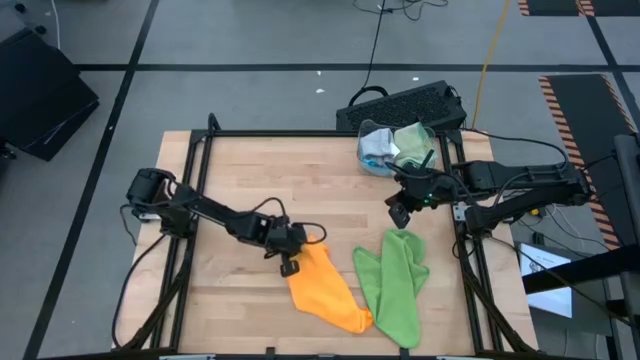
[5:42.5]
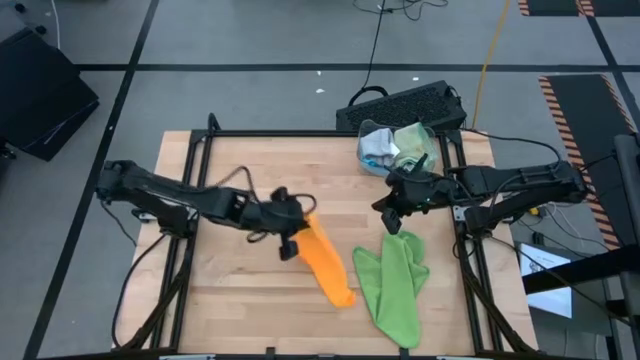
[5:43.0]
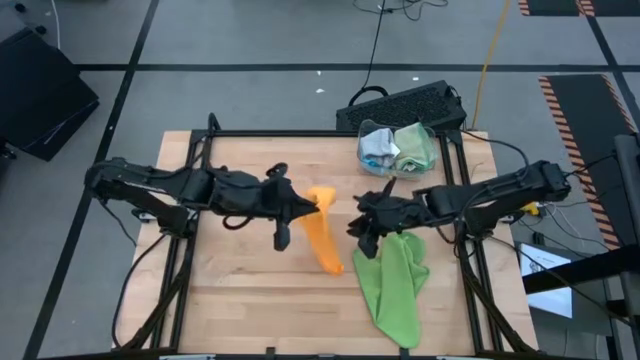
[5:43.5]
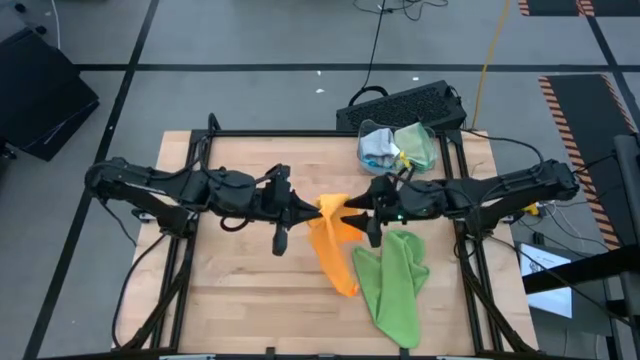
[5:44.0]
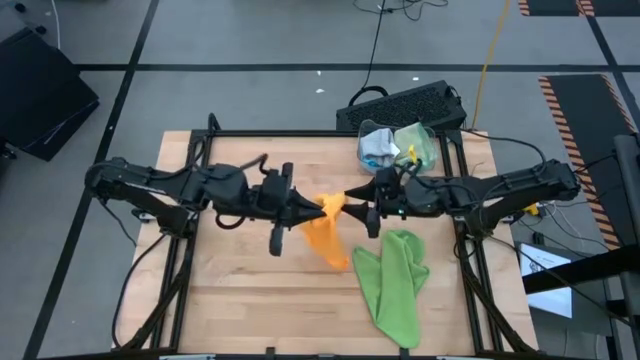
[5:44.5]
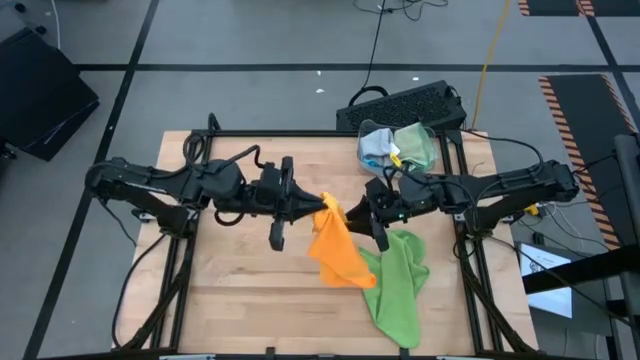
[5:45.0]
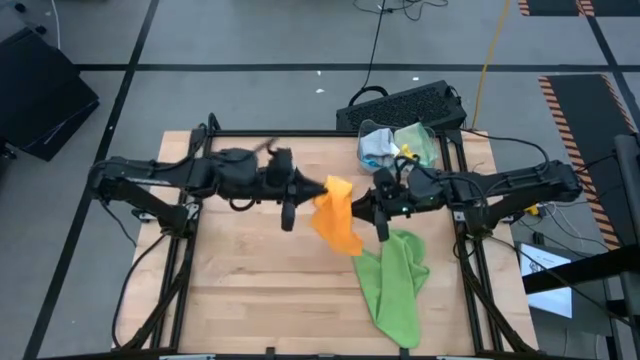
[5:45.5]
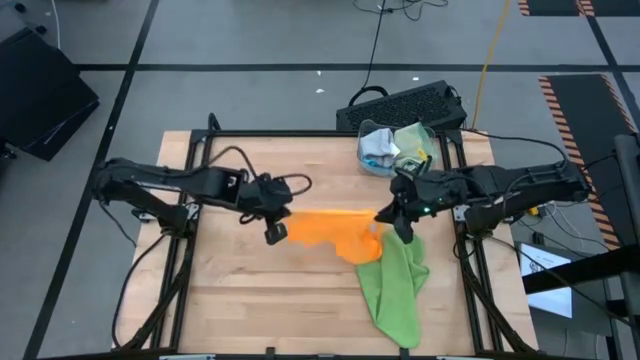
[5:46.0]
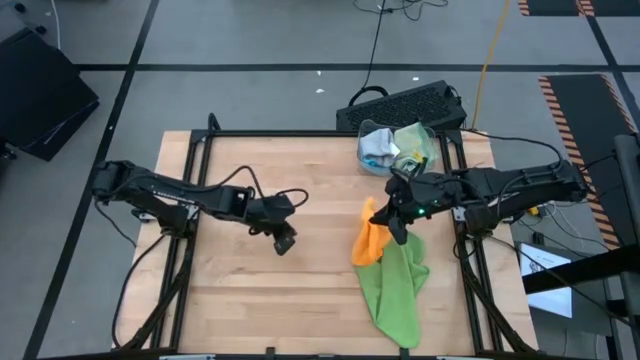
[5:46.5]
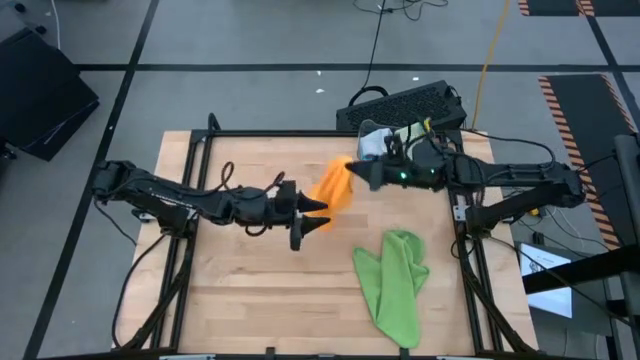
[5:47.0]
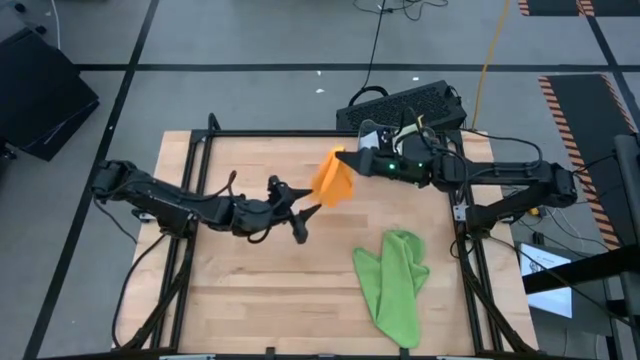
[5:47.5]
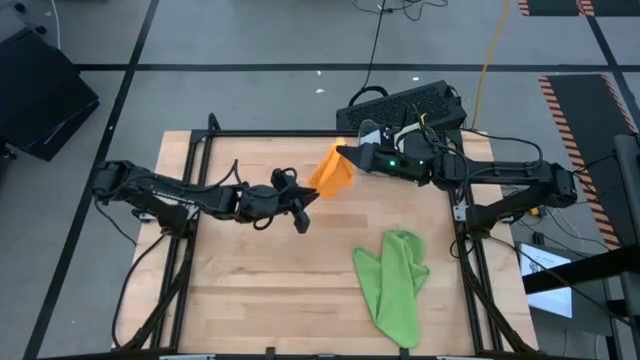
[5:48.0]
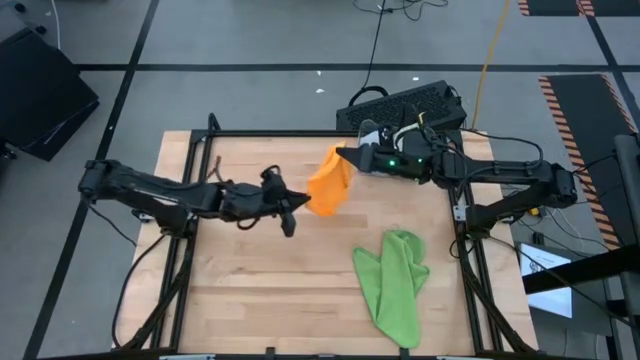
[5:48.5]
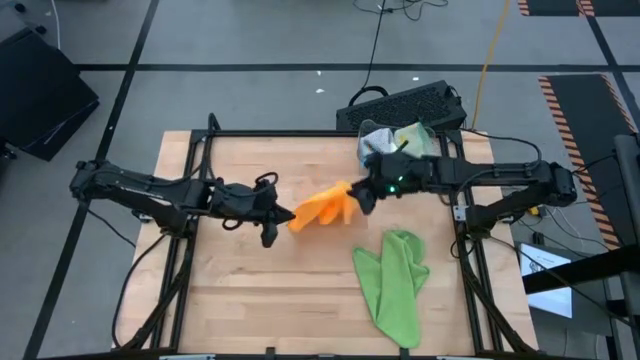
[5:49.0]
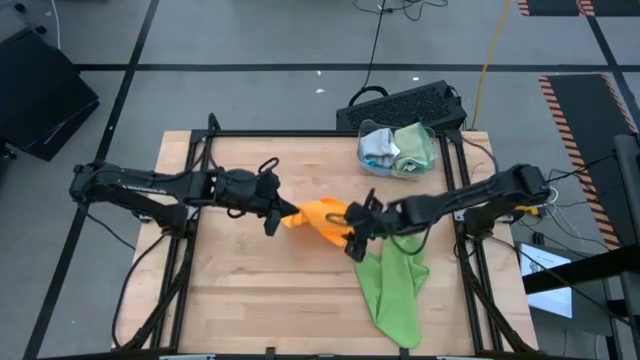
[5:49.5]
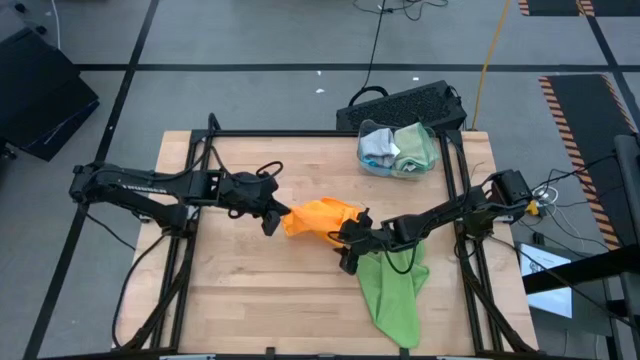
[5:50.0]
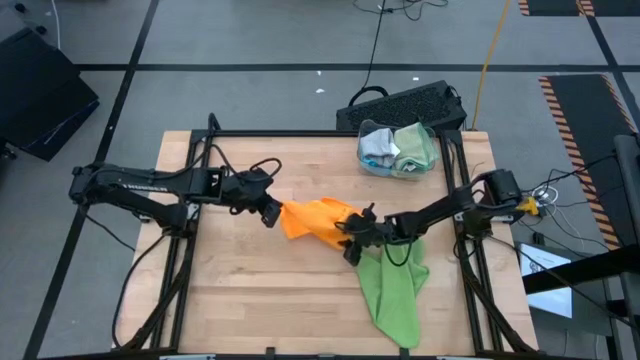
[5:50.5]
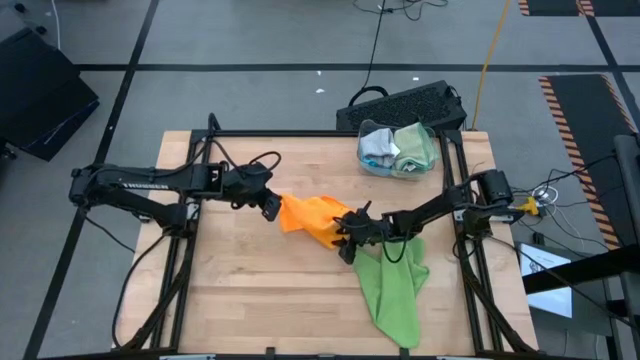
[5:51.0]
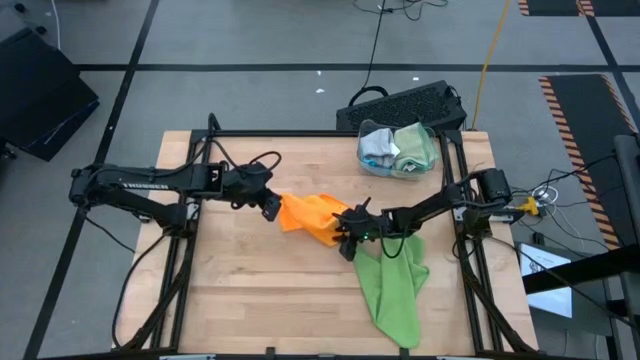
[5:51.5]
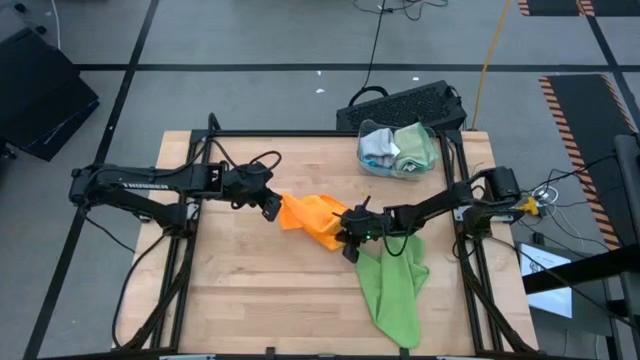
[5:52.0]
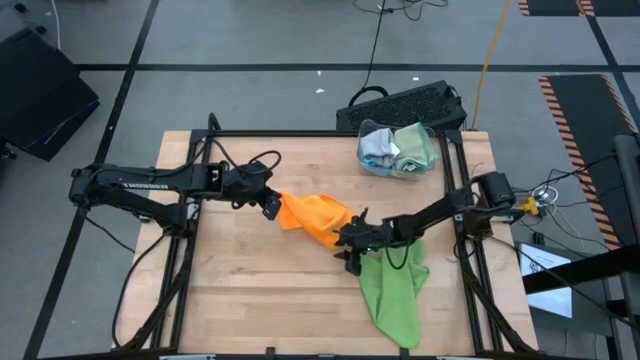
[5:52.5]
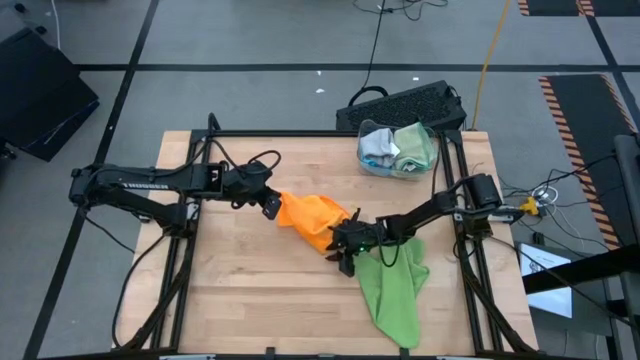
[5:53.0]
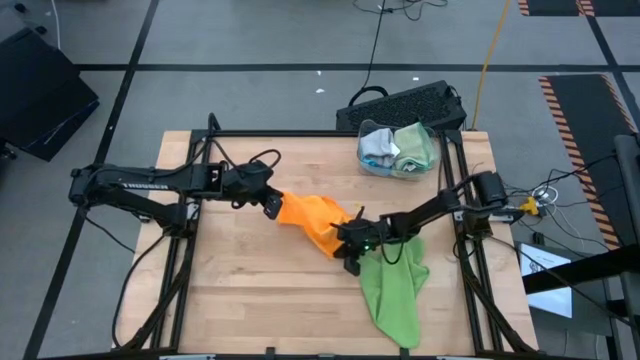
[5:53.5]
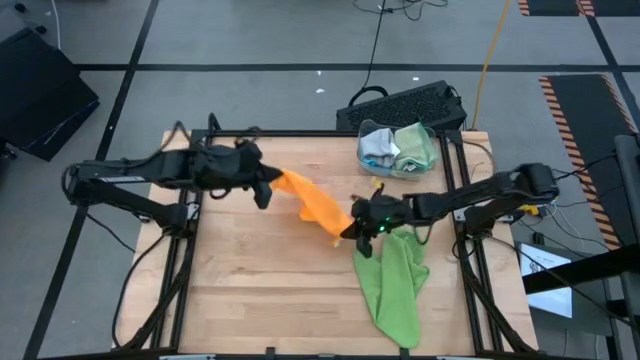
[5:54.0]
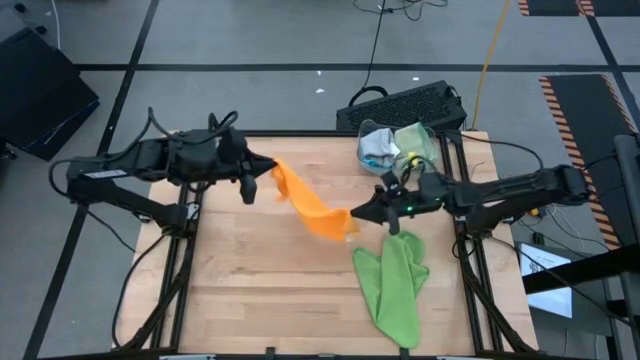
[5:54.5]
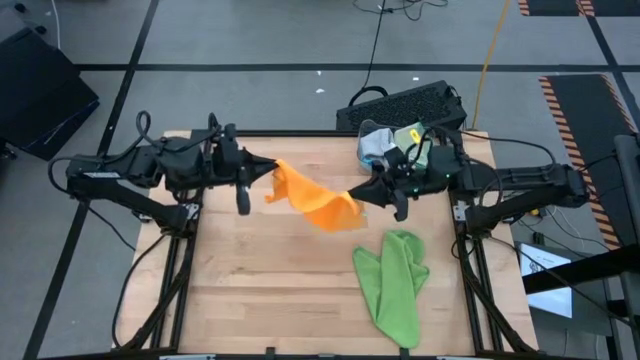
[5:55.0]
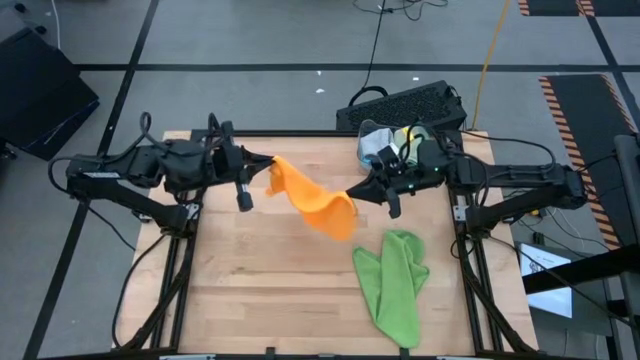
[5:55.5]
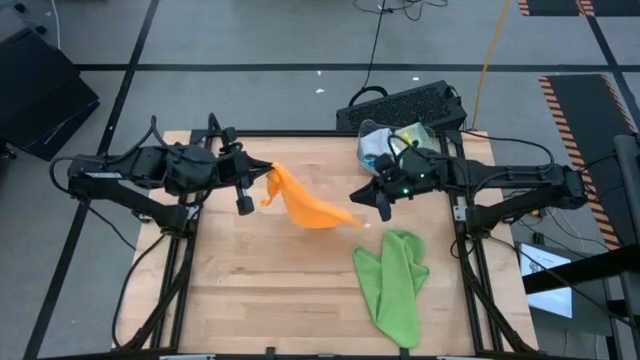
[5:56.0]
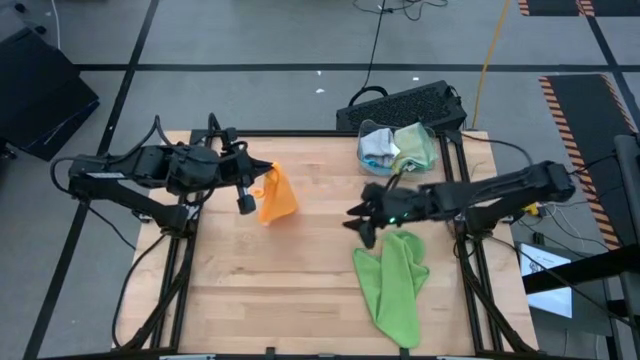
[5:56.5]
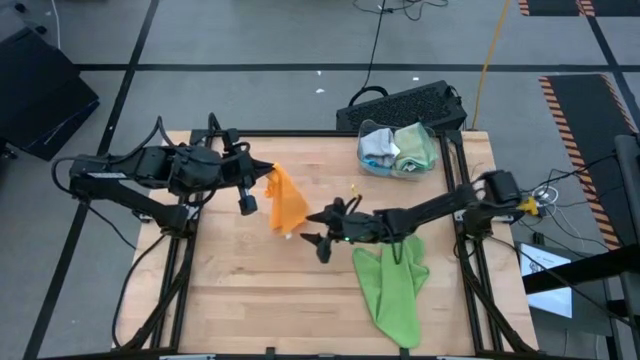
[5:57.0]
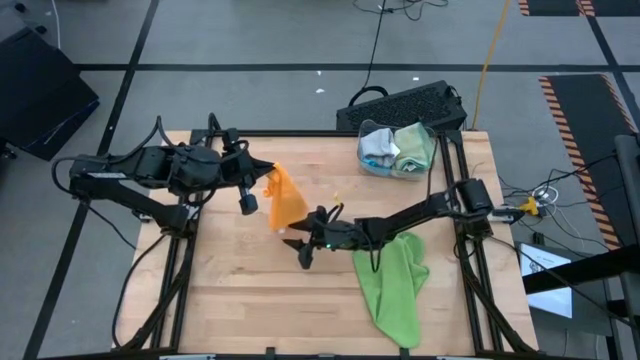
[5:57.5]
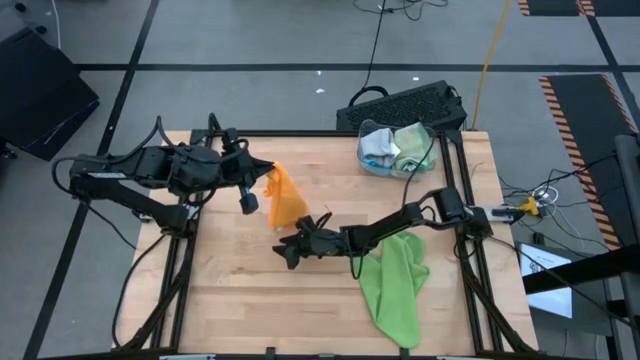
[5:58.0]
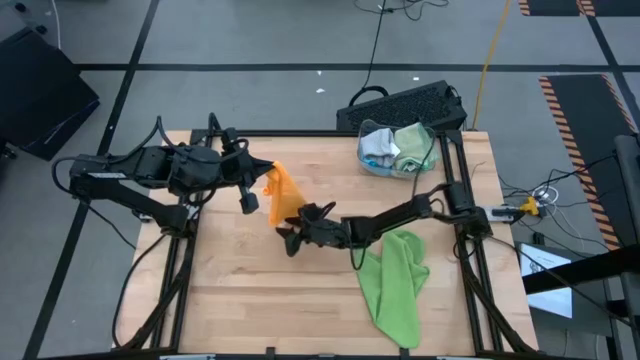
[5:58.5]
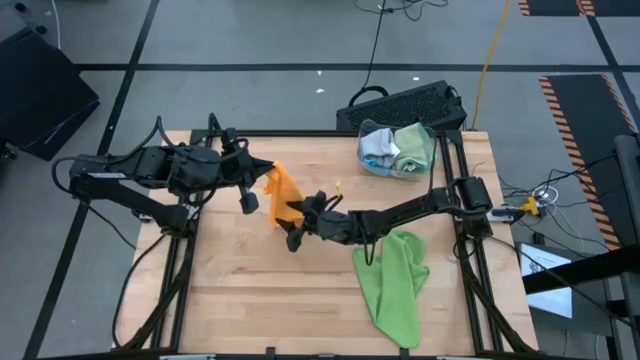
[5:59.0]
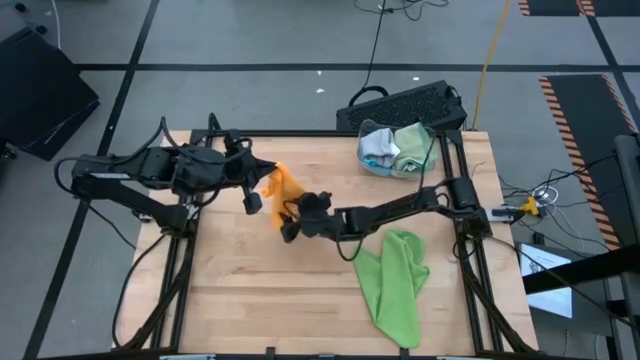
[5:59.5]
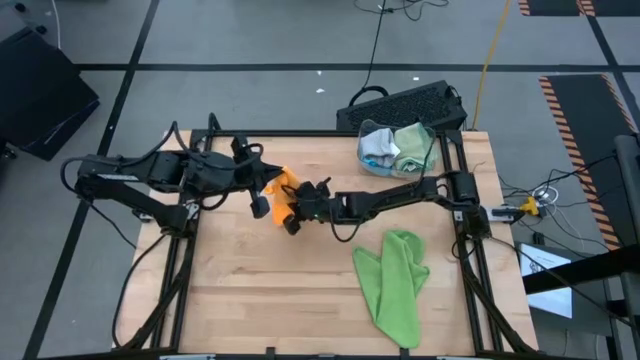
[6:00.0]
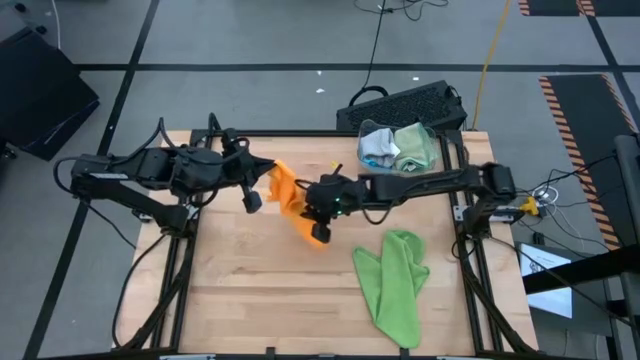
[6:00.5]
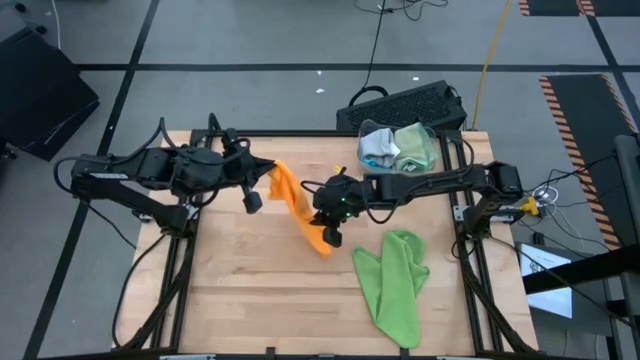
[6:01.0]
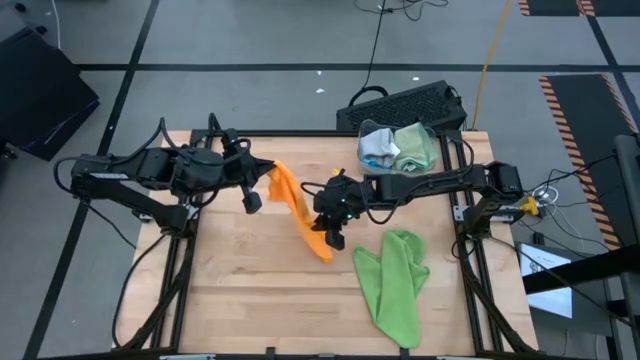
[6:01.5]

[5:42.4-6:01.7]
Task: Fold microfiber towels
Fold the yellow microfiber towel
